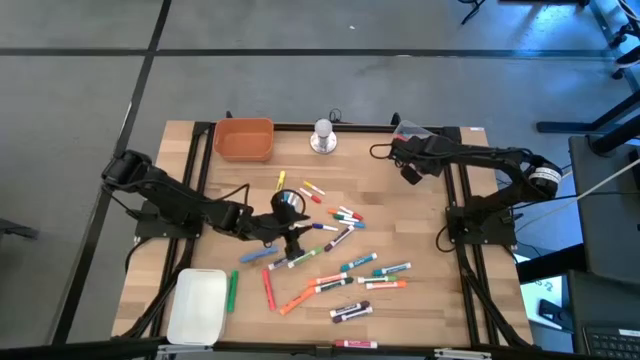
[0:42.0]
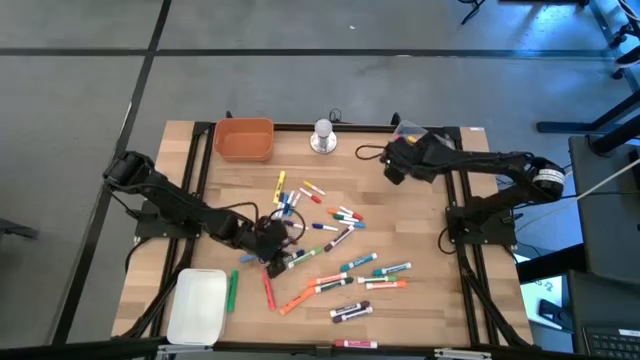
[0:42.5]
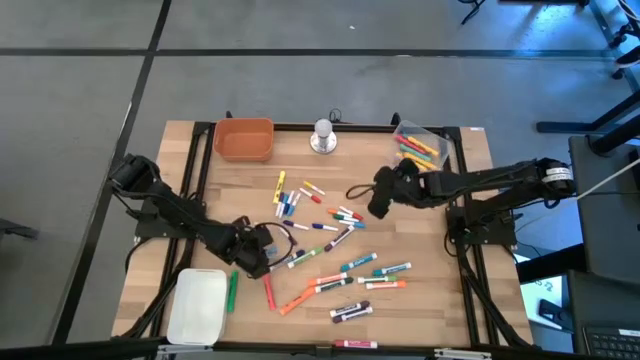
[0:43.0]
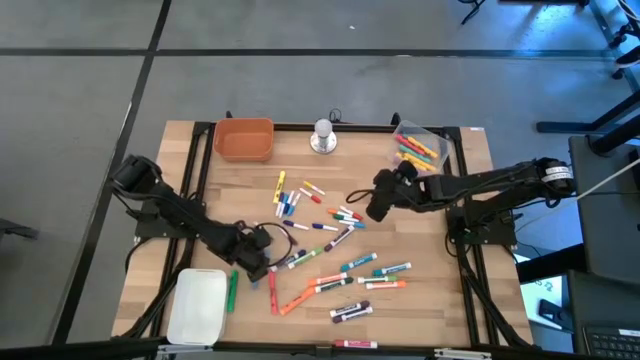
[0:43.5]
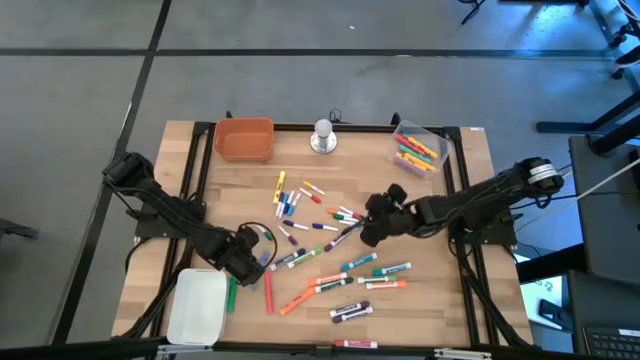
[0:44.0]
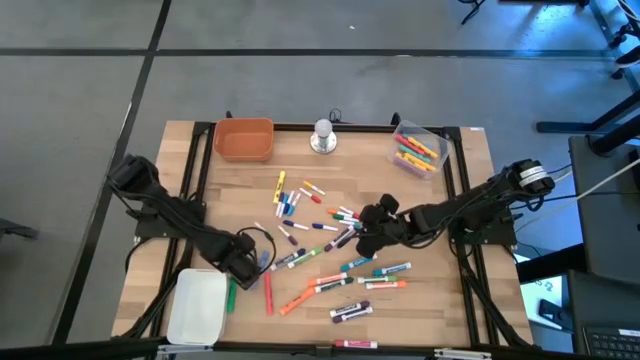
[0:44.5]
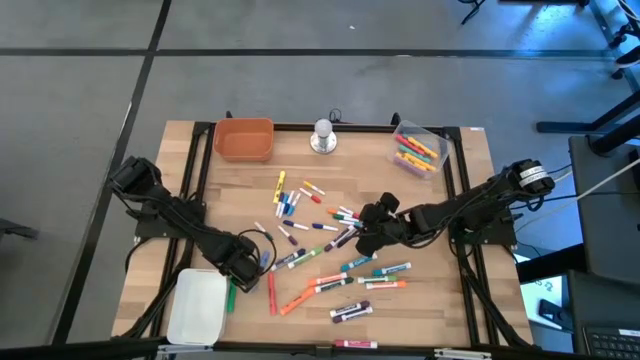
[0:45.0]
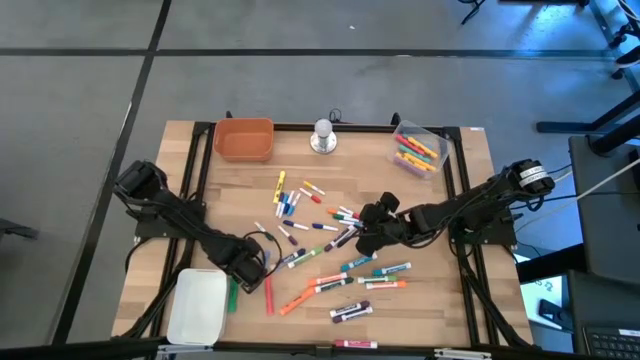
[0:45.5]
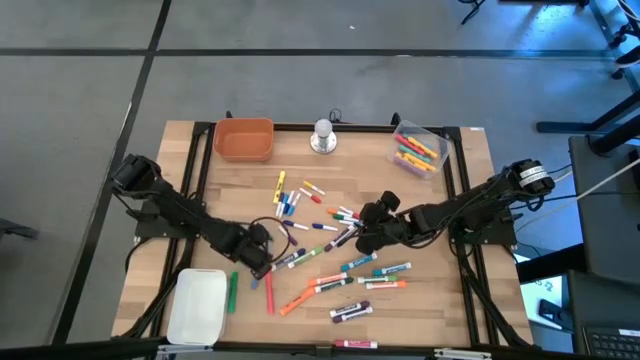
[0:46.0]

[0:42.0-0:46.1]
Task: Pick & Place Markers
Put the large green highlighter pen into the transparent bin

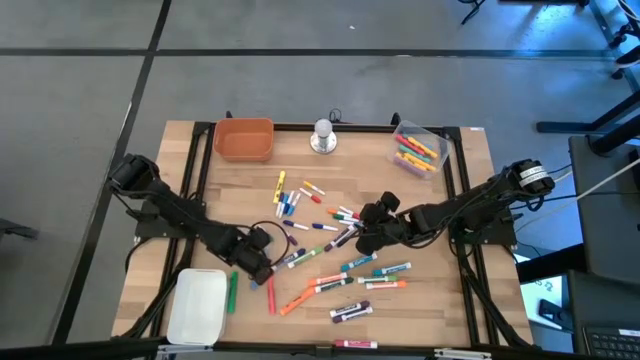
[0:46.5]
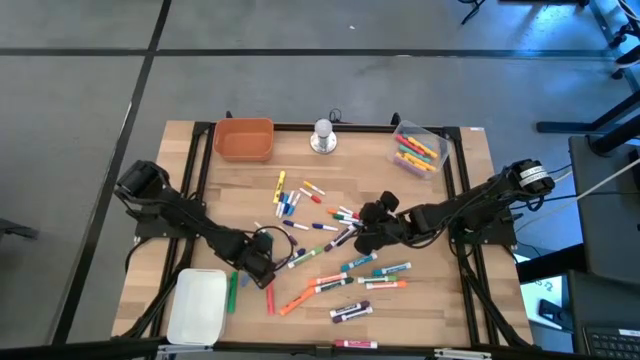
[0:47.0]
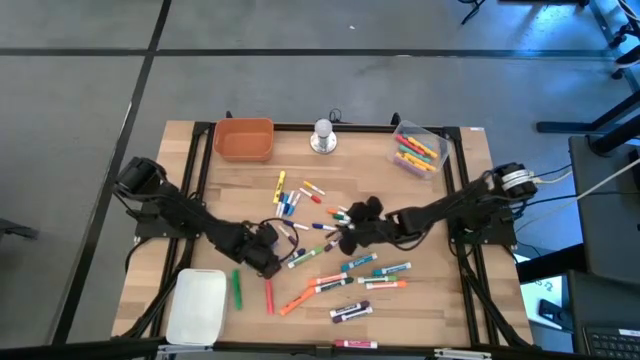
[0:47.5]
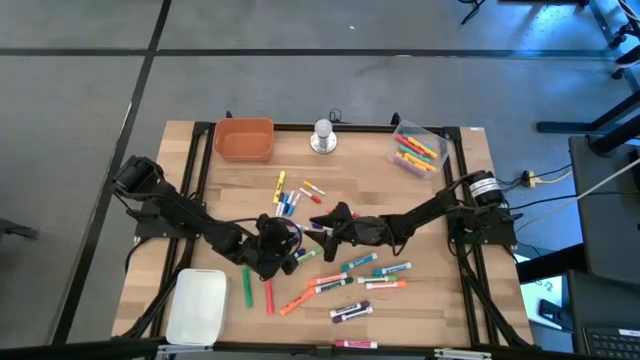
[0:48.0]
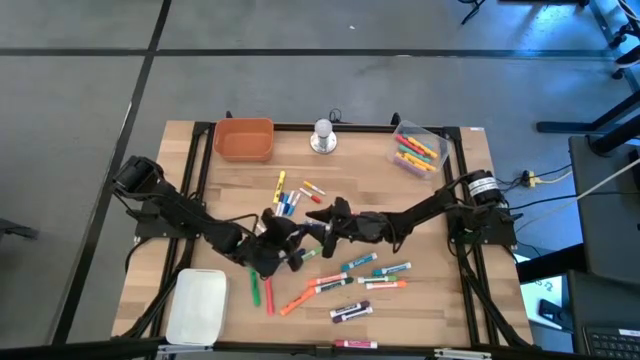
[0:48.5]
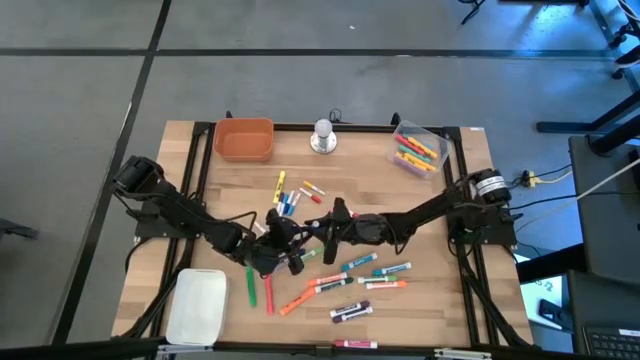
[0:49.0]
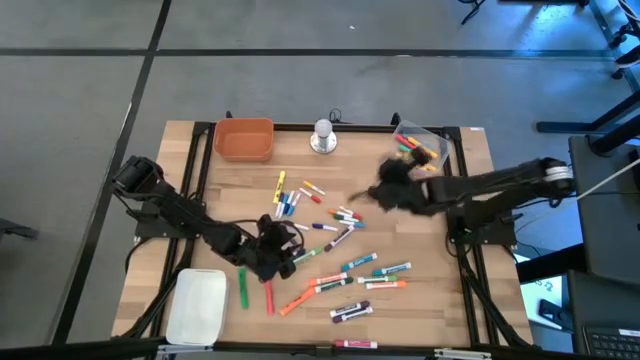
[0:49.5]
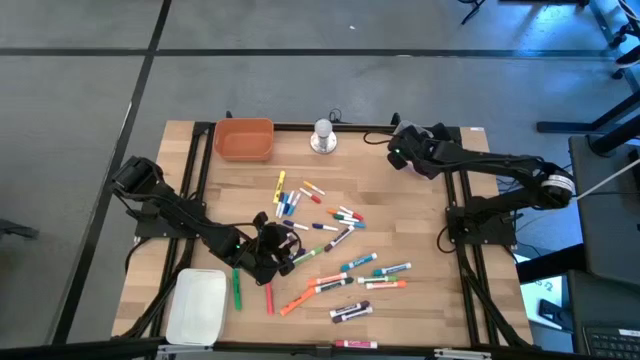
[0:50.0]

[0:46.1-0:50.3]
Put the large blue highlighter pen into the transparent bin

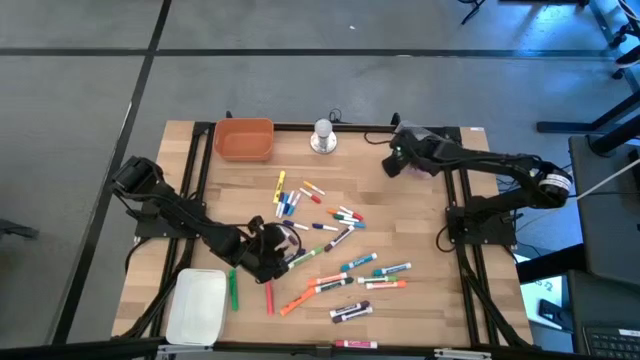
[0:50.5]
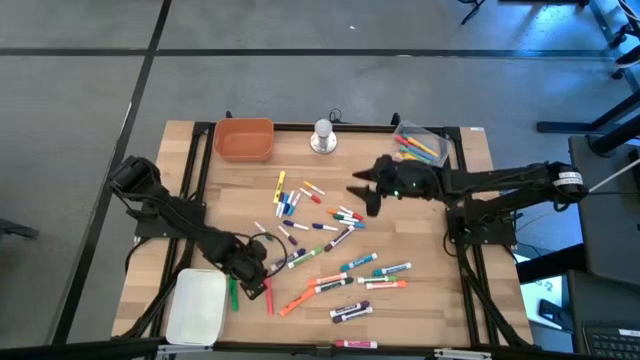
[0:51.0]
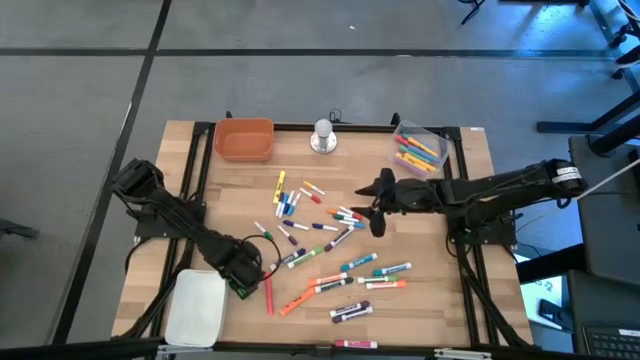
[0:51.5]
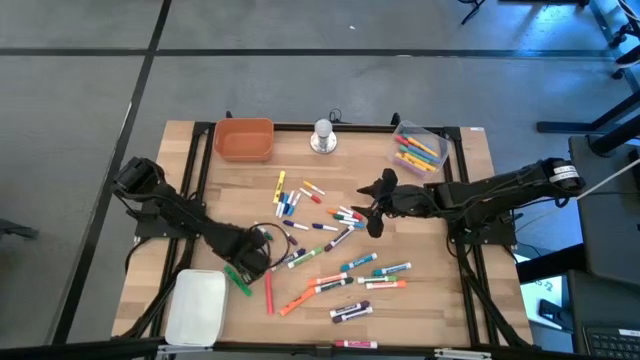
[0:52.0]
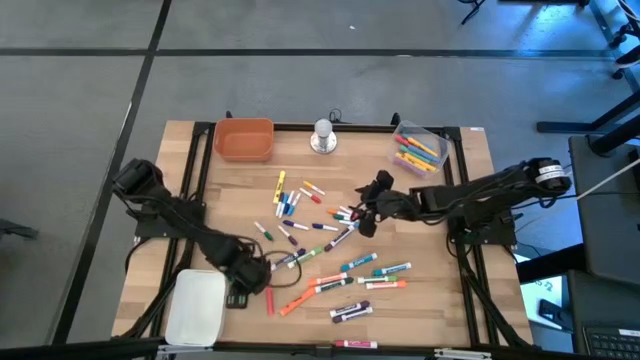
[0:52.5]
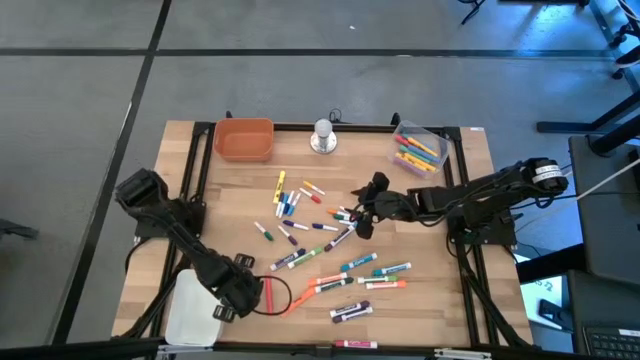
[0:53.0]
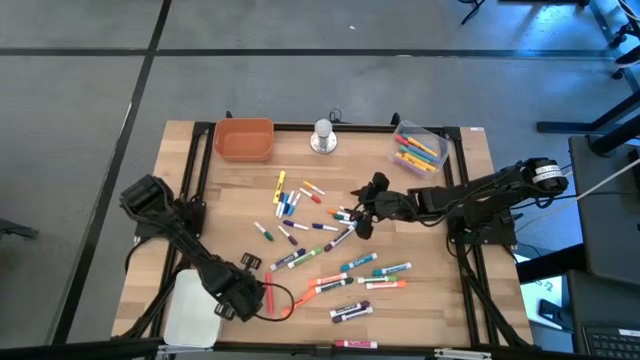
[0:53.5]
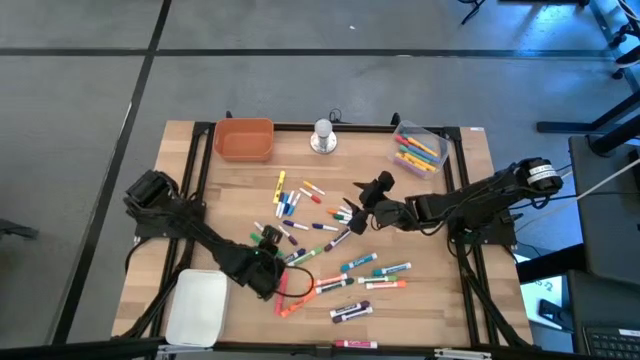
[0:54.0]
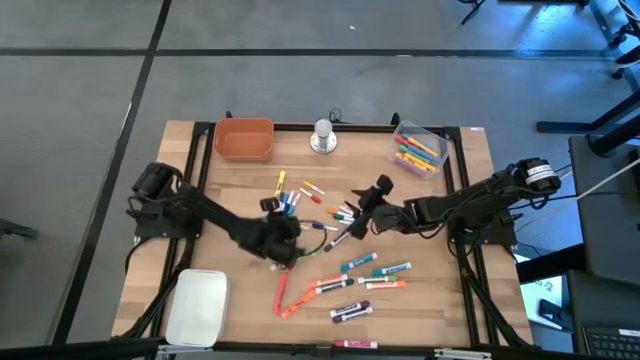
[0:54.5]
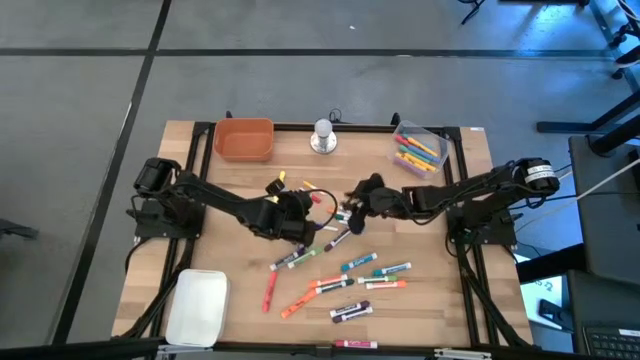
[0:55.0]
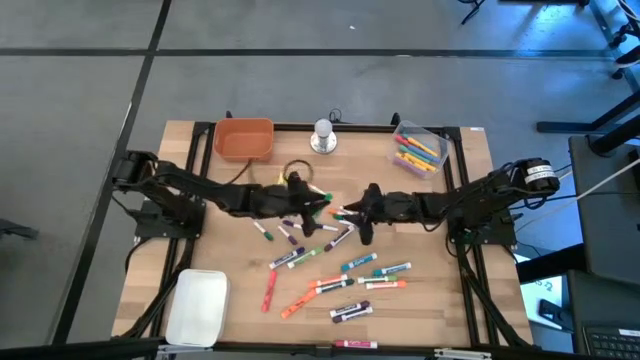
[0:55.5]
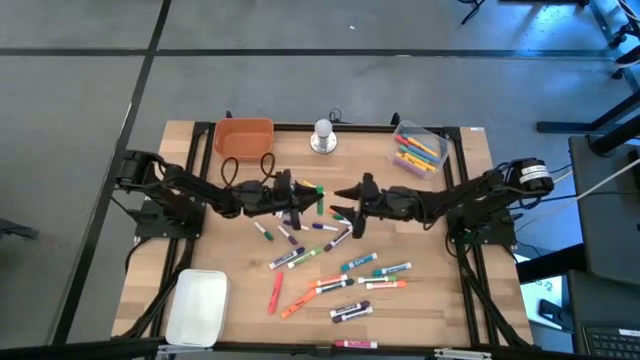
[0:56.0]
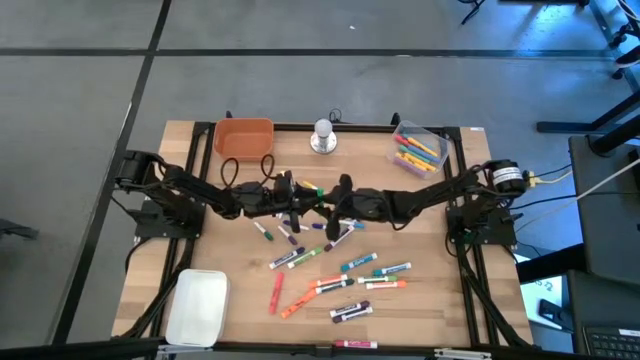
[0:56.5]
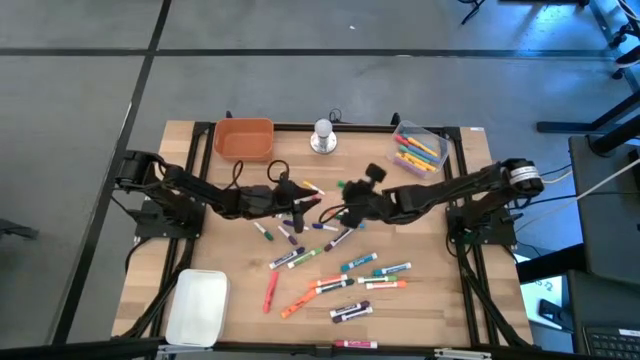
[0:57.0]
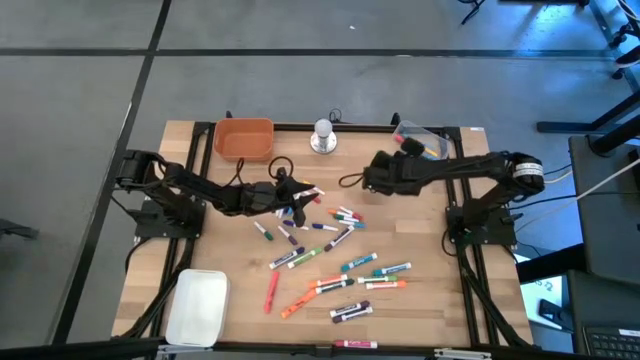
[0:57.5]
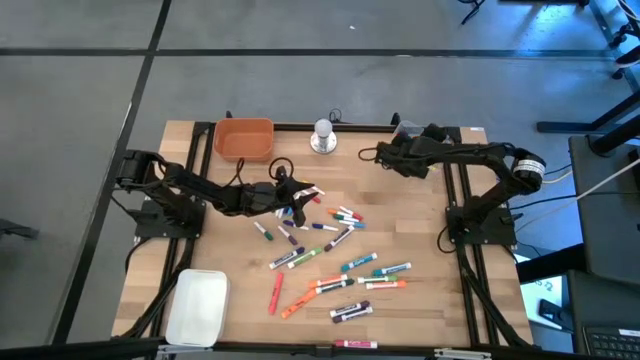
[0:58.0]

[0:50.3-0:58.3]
Put the large green highlighter pen into the transparent bin

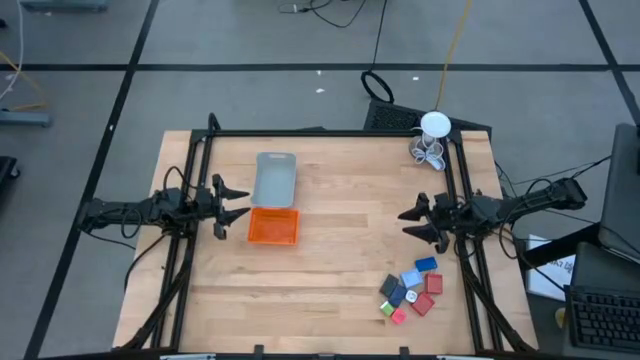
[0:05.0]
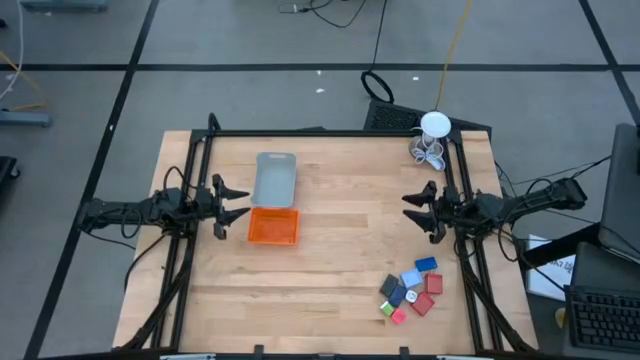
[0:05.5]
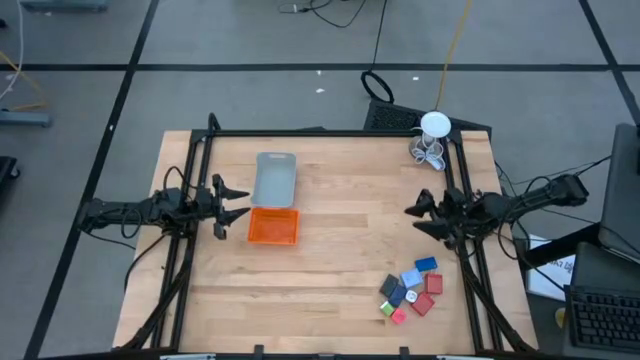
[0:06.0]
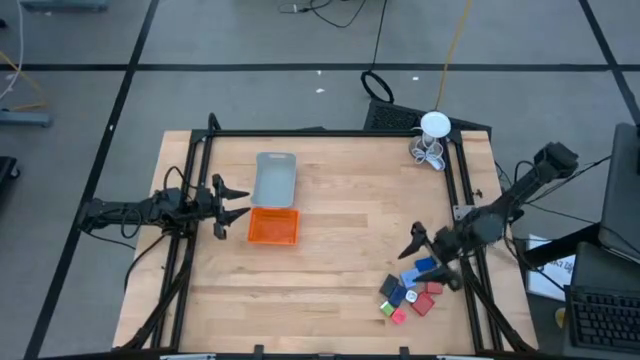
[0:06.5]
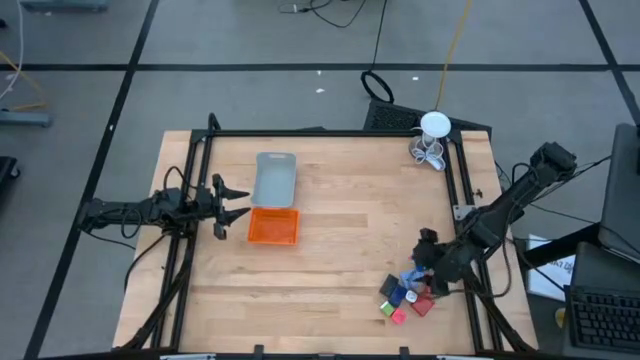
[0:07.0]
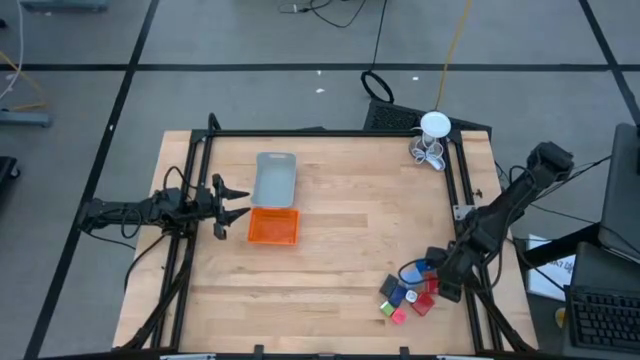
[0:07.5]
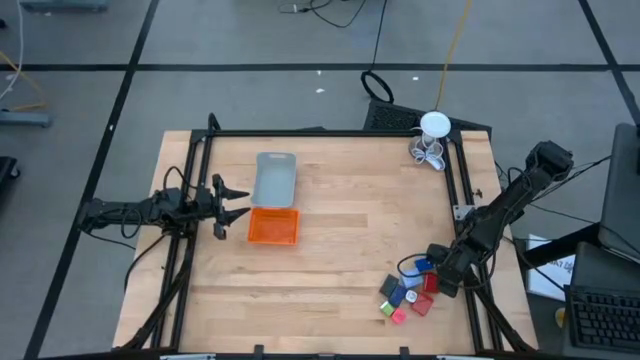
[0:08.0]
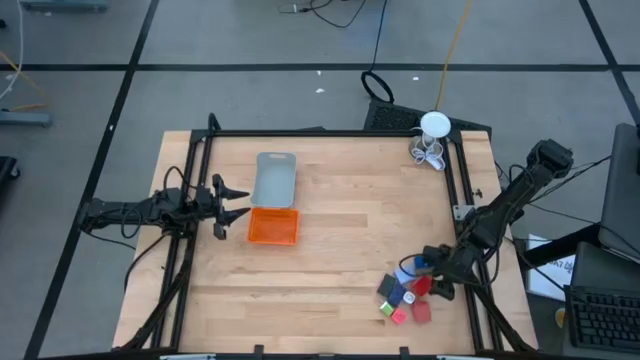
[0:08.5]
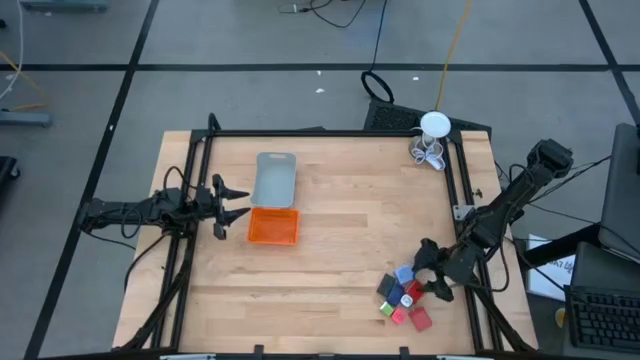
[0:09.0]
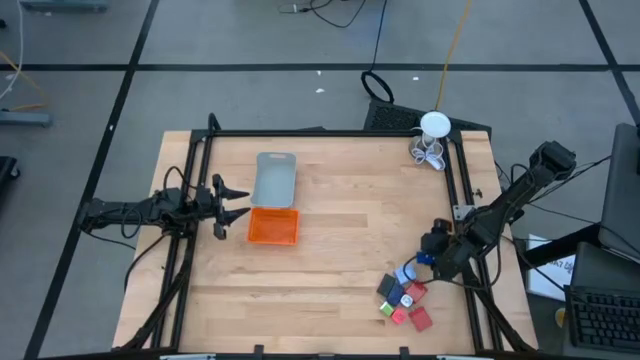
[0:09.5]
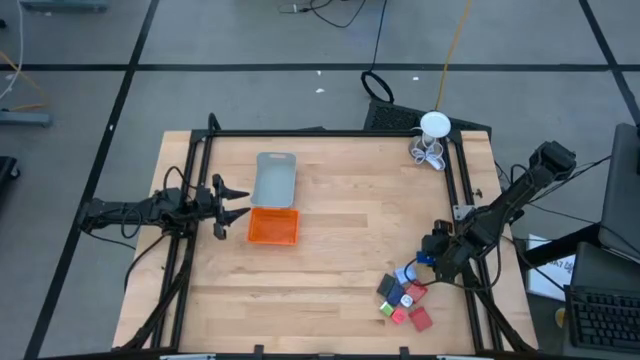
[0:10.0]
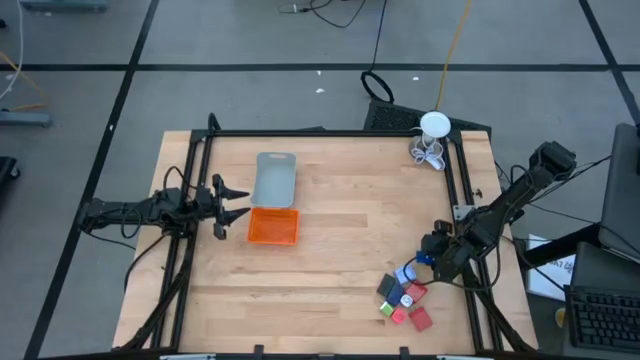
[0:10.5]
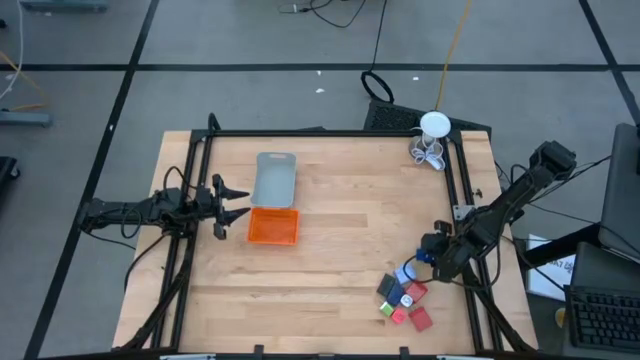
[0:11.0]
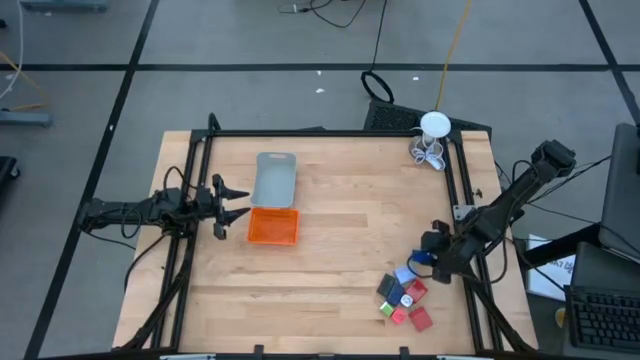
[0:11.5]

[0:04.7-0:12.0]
Task: Pick & Place Office items
Put the blue digital timer into the orange bin
